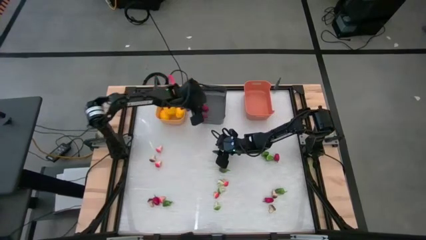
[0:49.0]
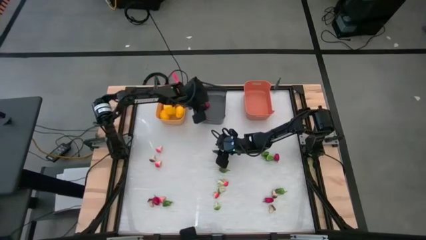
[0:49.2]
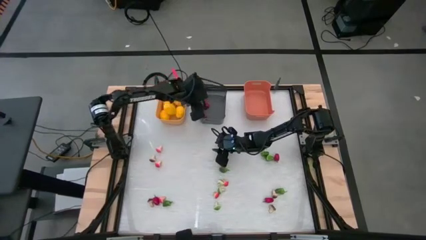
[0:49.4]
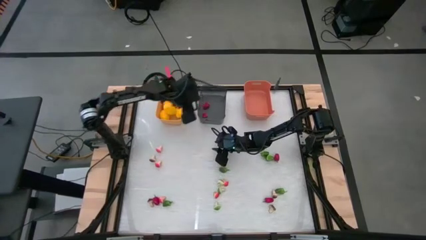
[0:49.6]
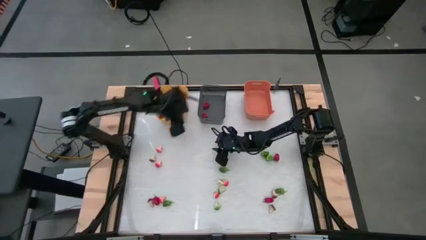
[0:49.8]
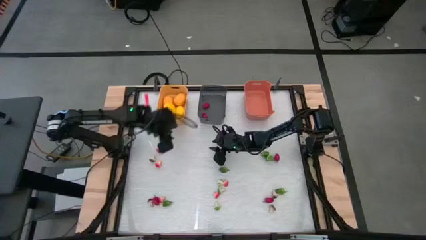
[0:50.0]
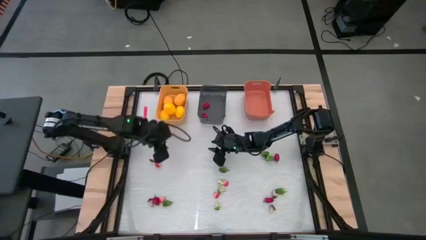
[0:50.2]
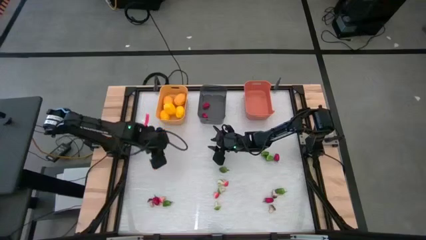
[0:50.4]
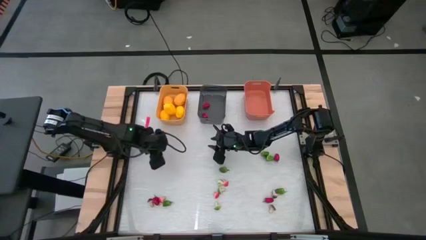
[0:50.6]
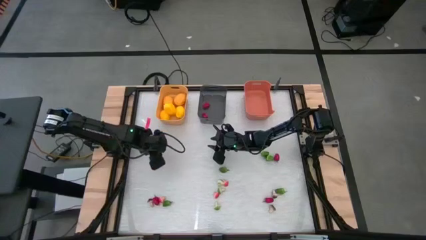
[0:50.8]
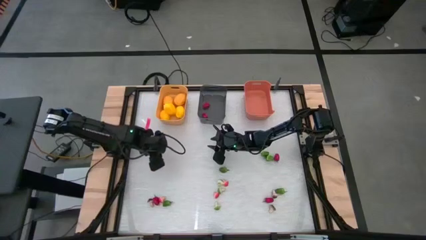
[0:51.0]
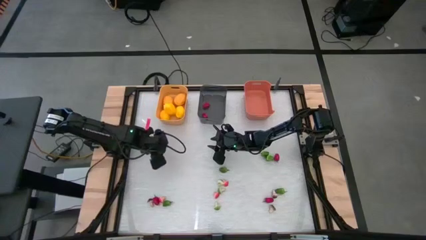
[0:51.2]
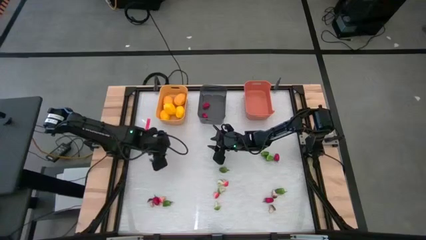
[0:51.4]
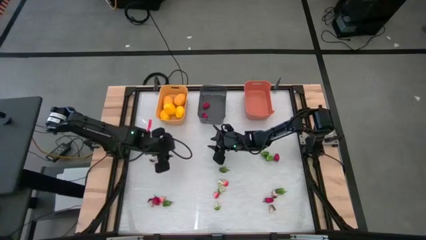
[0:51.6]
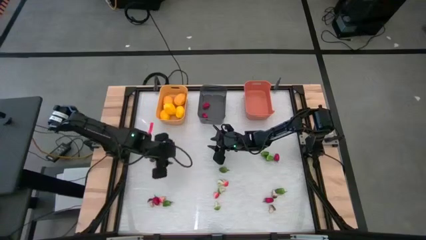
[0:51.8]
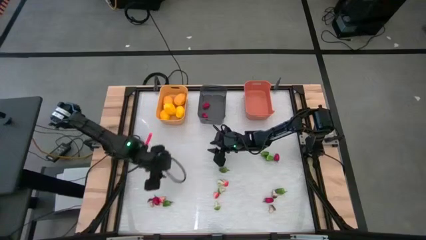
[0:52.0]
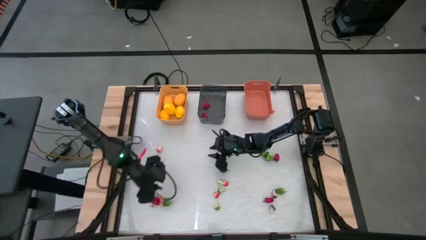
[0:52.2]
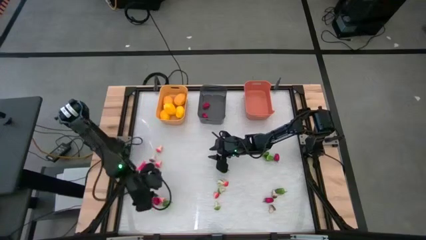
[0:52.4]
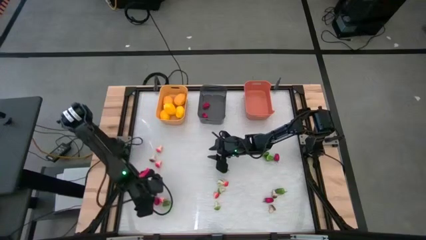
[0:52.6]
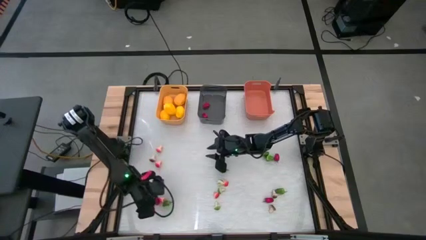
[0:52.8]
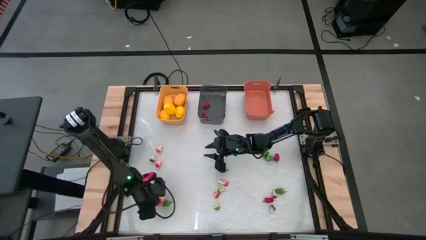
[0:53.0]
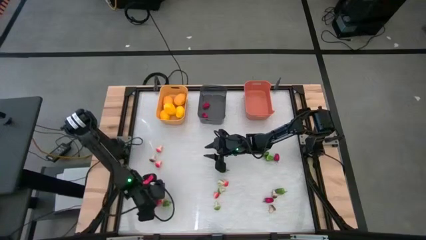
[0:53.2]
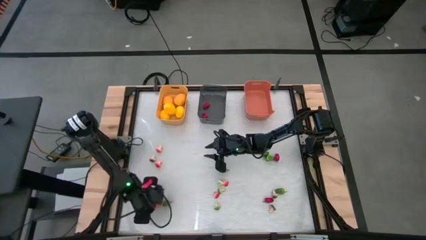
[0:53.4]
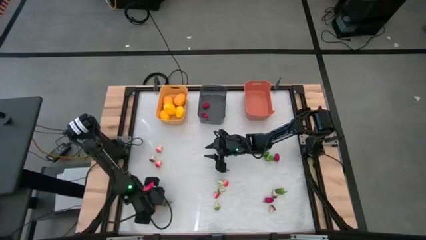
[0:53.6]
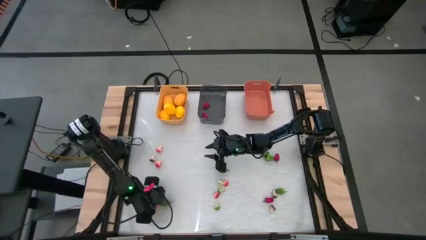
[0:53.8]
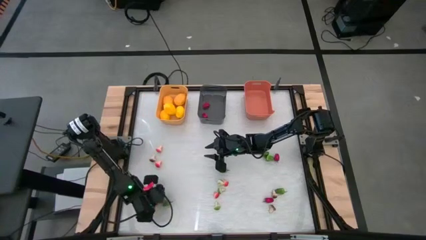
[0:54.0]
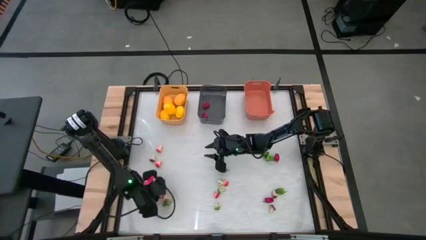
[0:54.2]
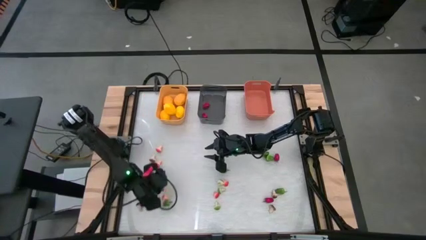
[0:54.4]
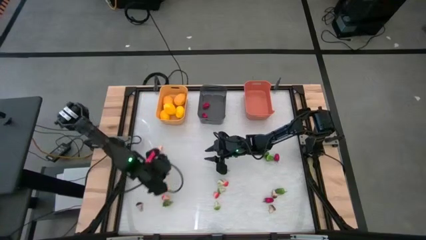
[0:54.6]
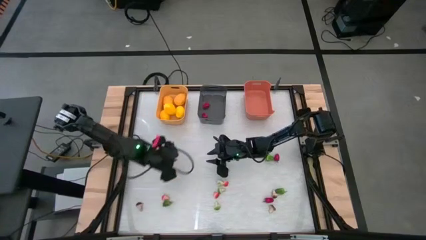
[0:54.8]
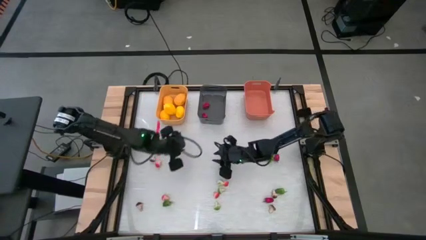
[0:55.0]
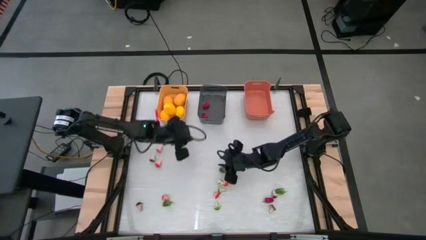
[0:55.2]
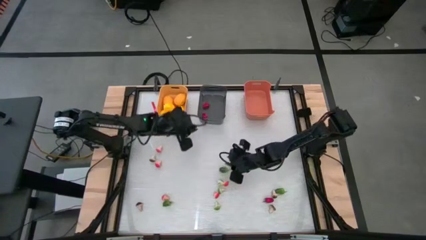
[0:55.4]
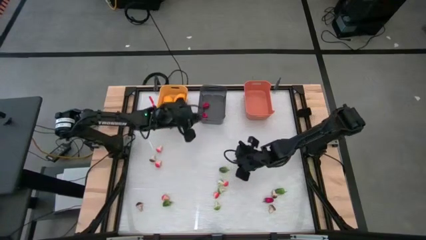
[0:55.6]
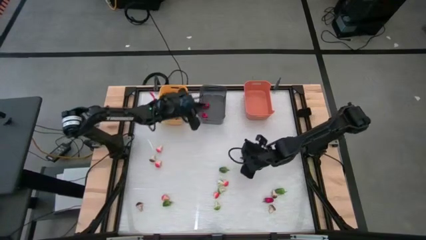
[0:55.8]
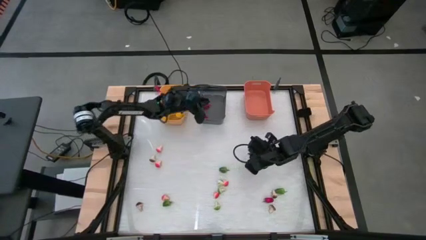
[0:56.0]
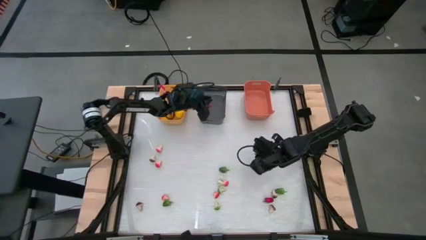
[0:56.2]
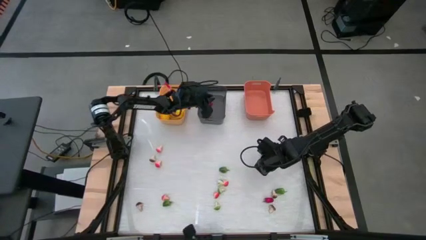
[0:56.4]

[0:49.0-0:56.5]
Task: Sort produce into baskets
Put the red chili pepper into the black bin

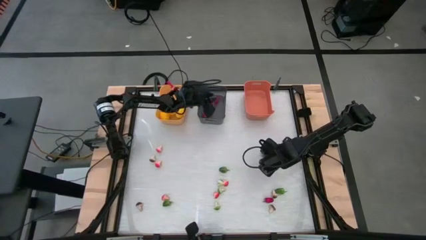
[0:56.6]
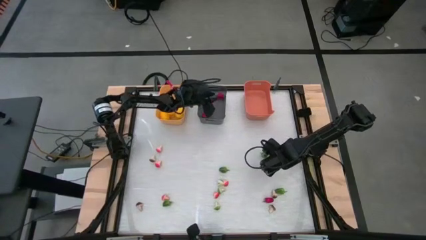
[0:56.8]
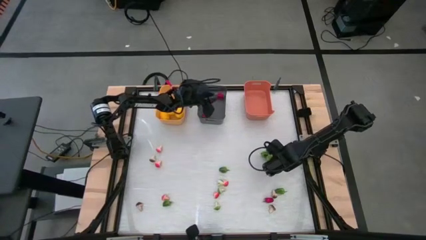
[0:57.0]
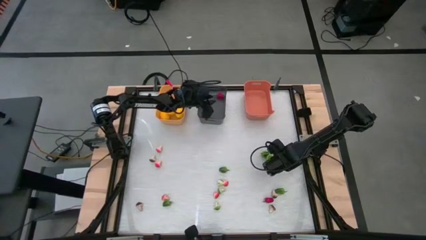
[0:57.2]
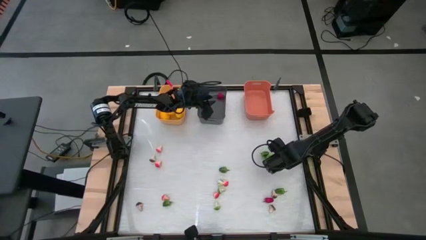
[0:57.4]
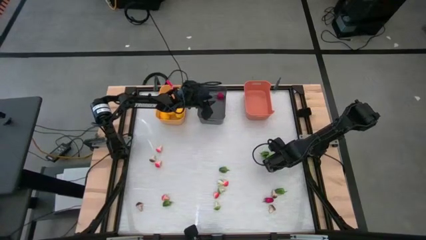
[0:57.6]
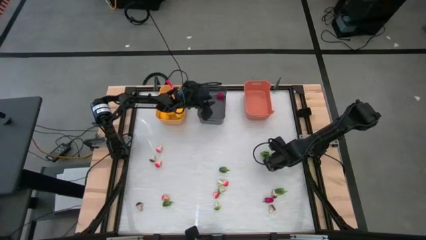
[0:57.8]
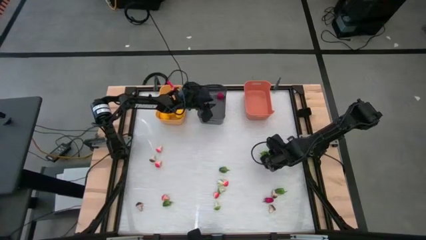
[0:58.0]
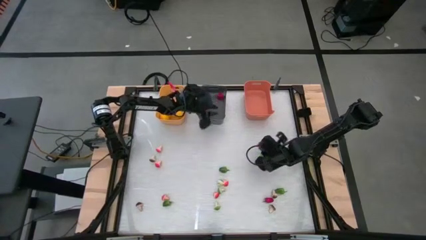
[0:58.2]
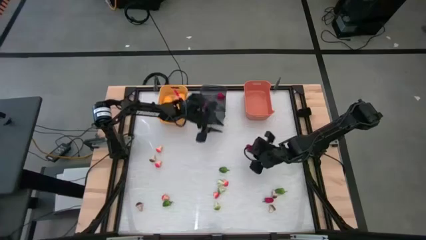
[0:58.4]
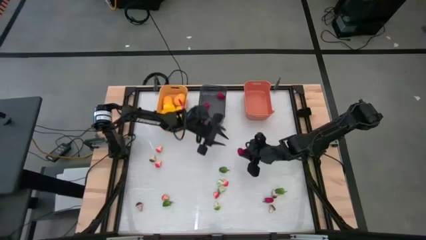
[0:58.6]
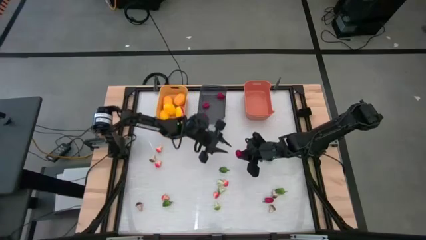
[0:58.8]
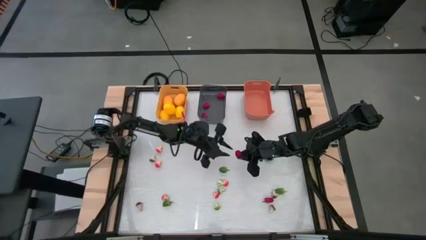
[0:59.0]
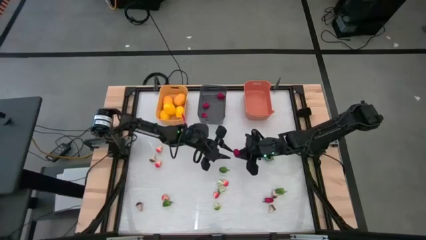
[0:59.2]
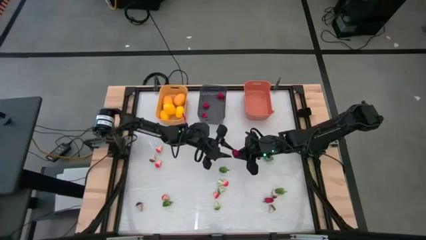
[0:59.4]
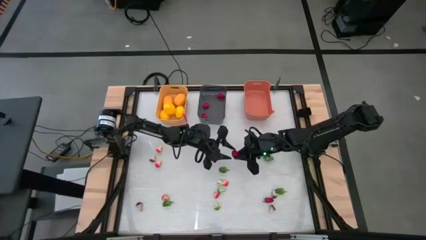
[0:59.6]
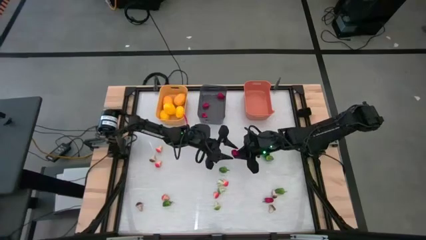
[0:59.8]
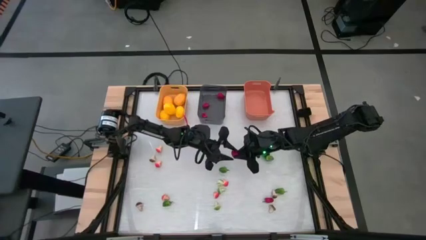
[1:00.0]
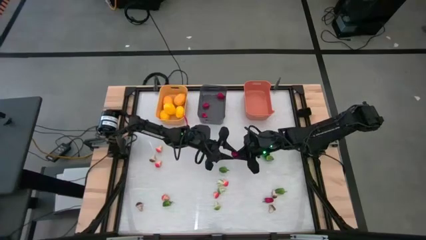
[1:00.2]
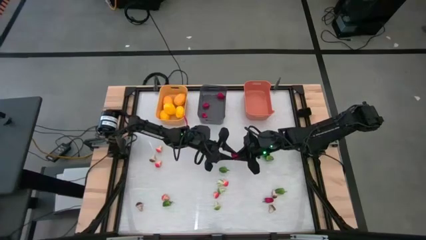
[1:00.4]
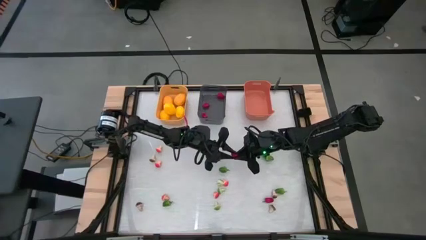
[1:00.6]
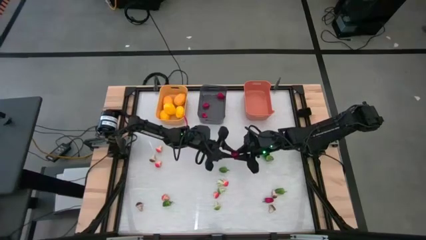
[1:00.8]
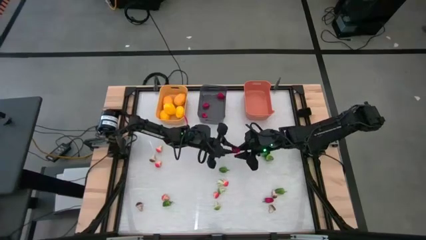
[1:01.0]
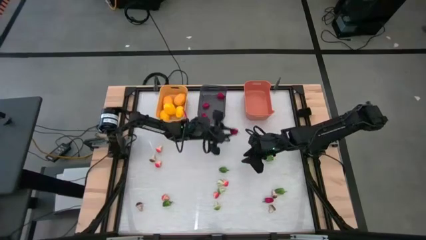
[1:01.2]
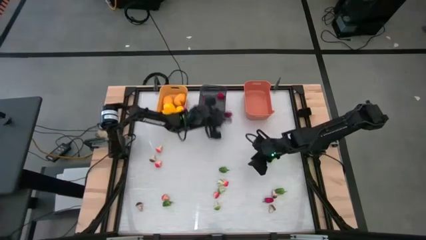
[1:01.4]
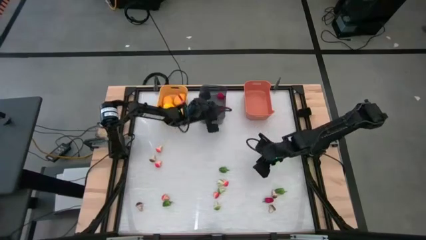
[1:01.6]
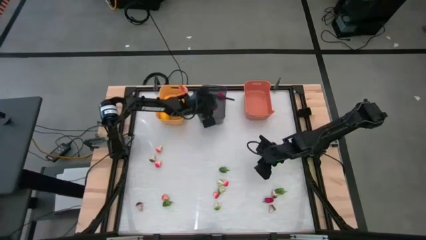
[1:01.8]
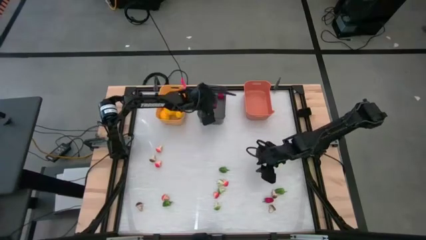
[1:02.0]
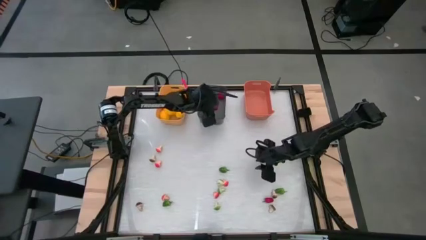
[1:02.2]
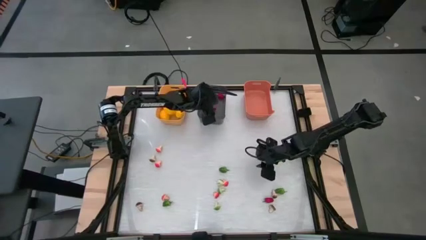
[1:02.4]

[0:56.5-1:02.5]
Put the red chili pepper into the black bin

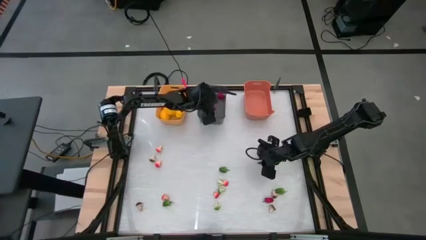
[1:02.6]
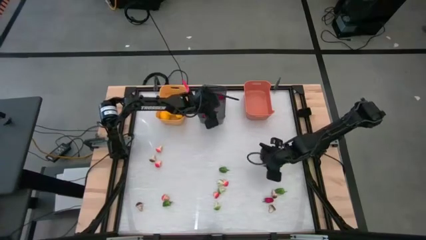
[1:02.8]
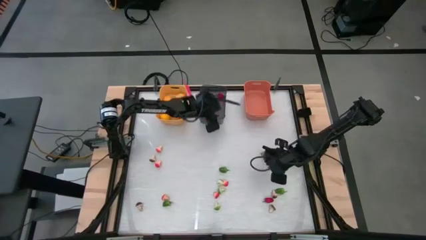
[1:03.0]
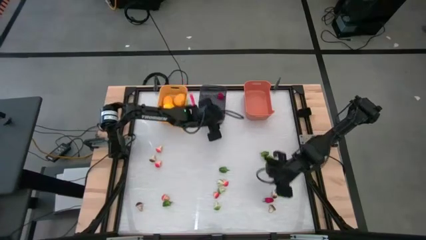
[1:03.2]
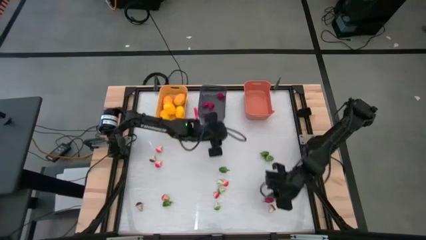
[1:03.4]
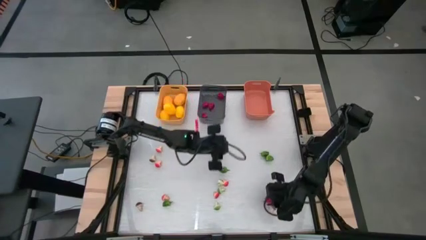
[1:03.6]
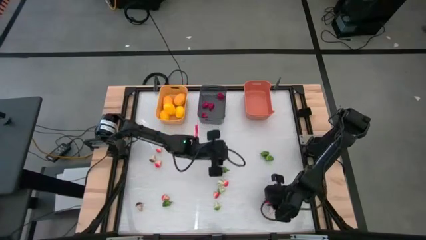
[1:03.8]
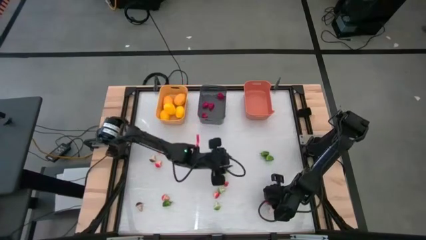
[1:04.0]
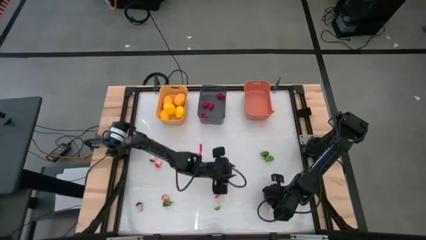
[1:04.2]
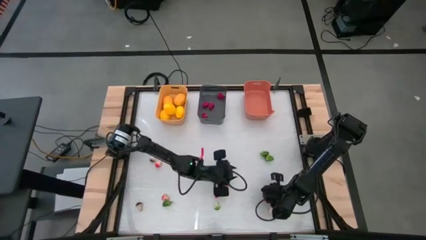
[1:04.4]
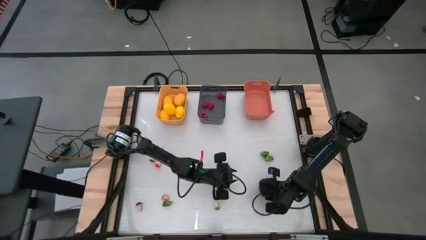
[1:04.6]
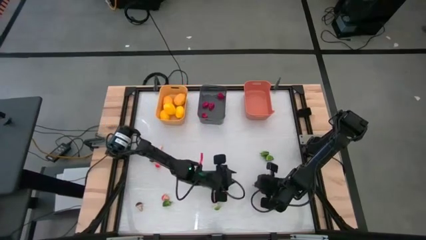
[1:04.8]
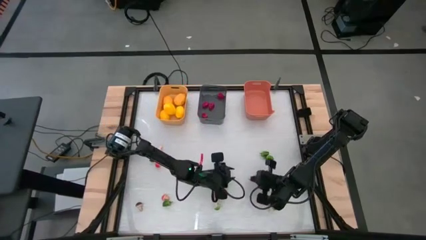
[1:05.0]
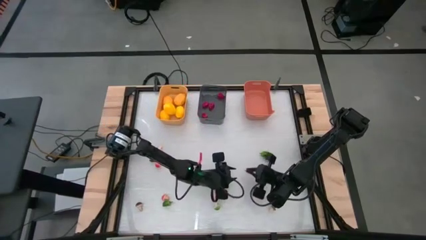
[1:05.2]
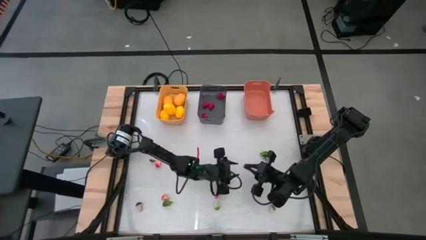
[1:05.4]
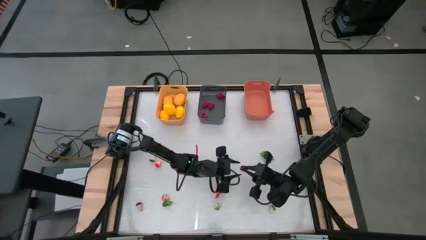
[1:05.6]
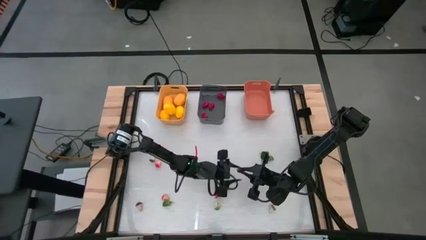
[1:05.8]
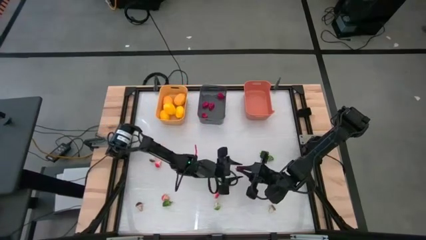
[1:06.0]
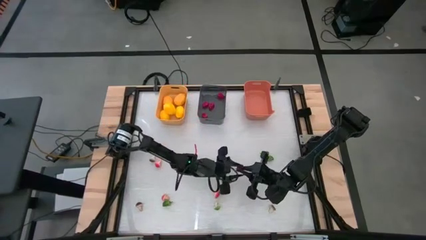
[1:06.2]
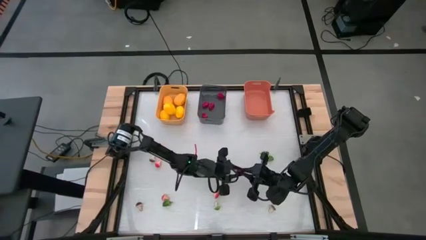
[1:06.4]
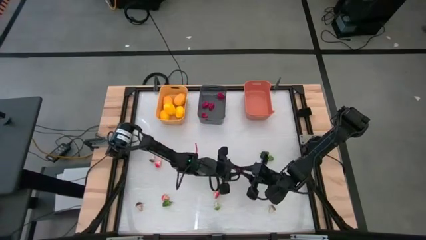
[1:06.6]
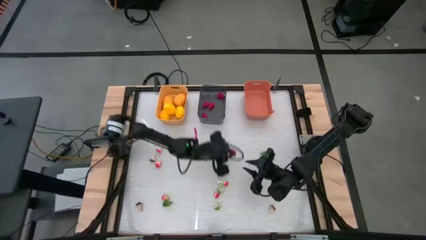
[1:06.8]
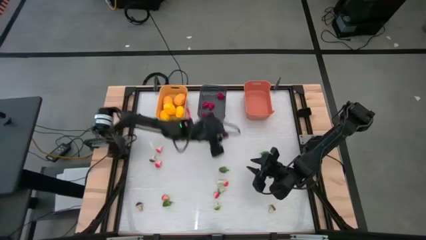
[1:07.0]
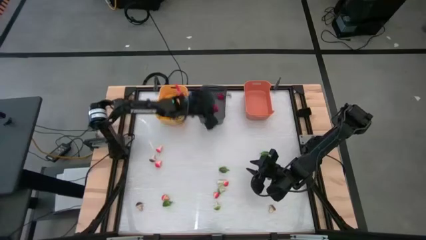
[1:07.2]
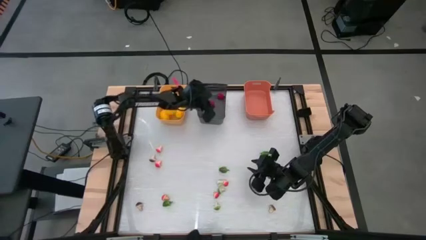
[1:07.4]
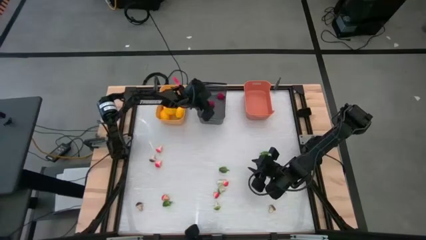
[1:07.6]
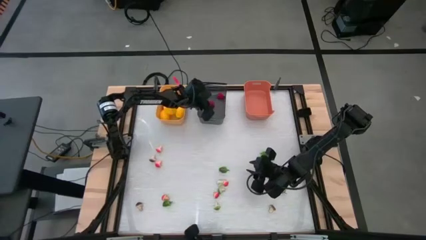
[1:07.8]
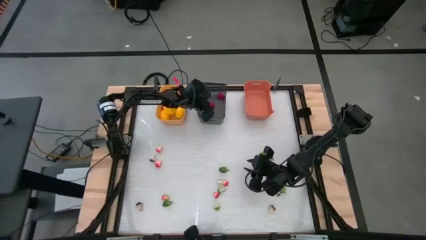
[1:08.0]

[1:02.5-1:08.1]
Put the red chili pepper into the black bin
